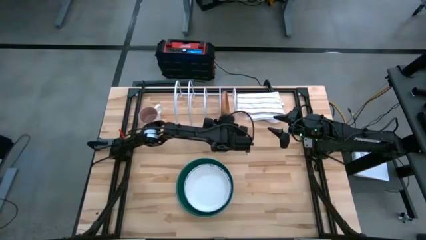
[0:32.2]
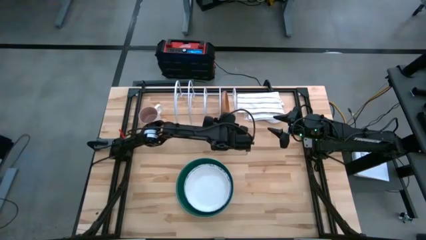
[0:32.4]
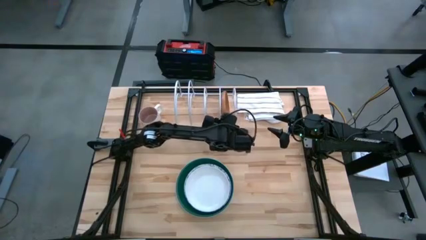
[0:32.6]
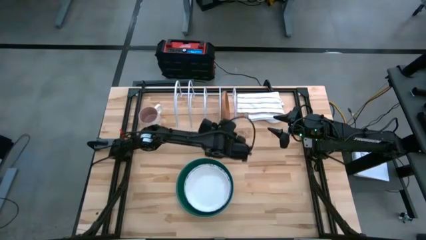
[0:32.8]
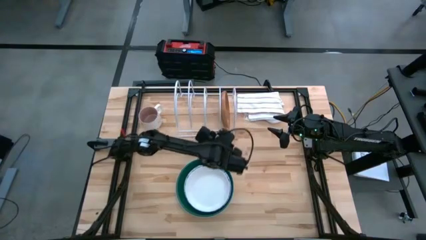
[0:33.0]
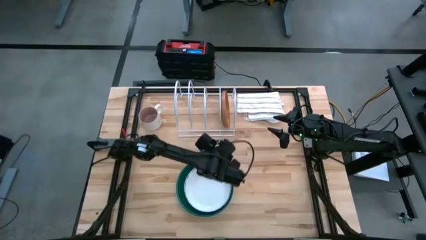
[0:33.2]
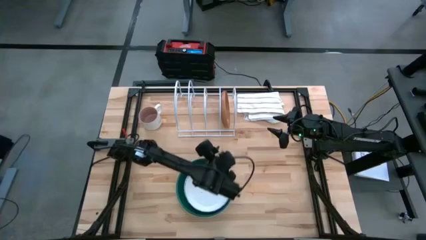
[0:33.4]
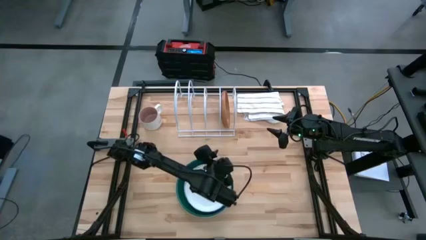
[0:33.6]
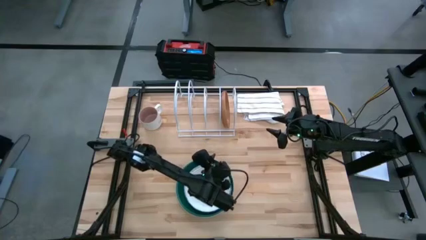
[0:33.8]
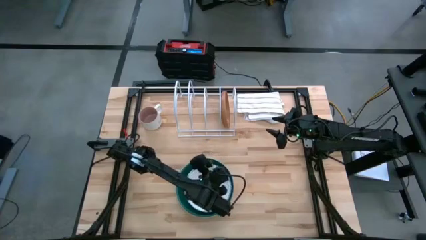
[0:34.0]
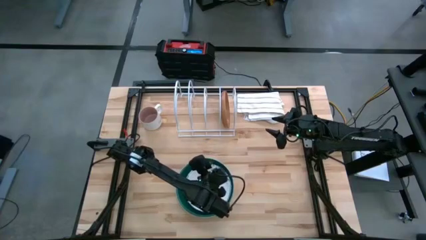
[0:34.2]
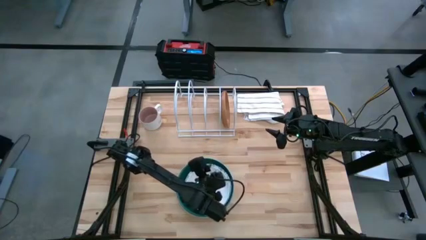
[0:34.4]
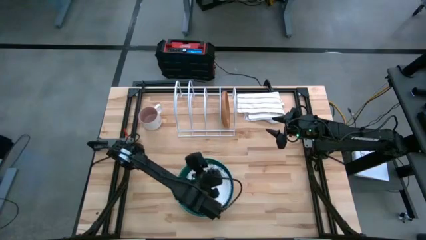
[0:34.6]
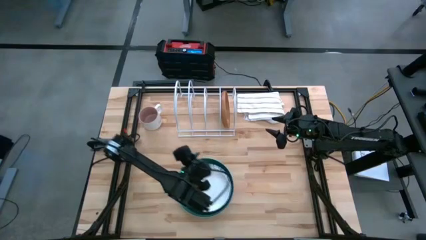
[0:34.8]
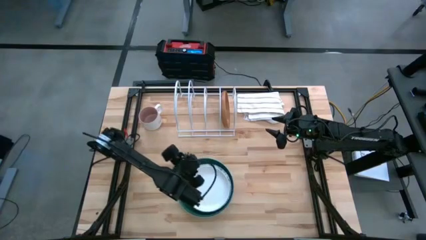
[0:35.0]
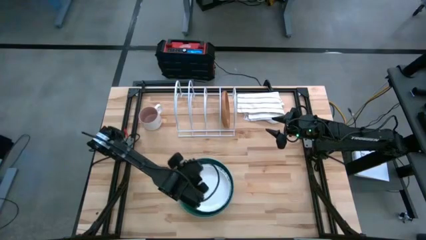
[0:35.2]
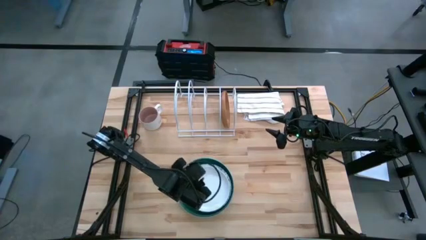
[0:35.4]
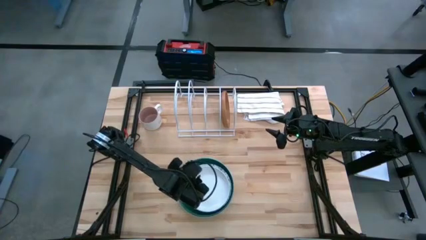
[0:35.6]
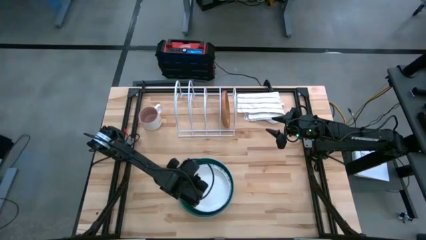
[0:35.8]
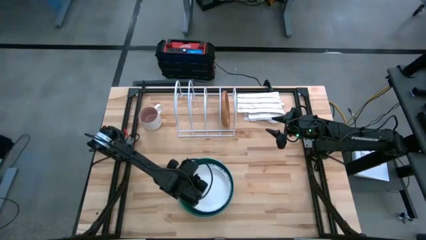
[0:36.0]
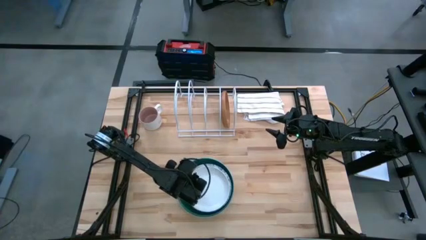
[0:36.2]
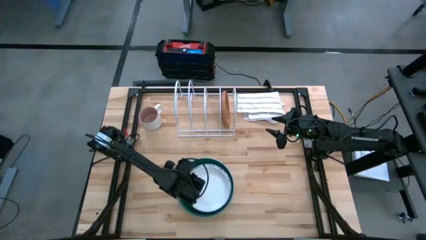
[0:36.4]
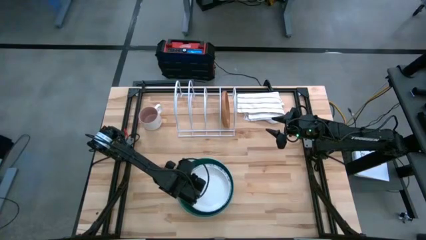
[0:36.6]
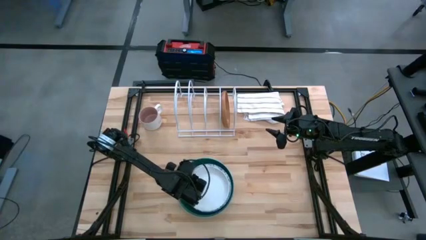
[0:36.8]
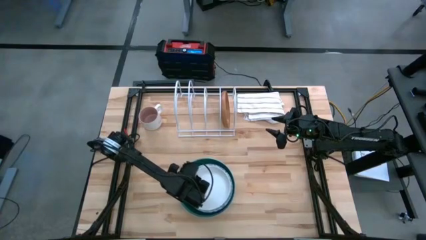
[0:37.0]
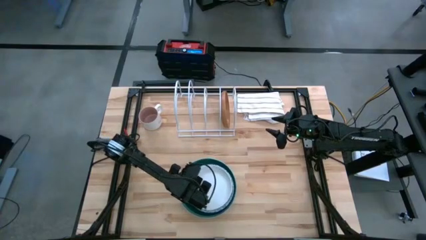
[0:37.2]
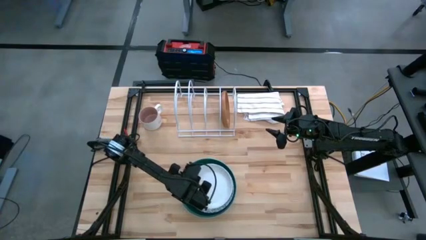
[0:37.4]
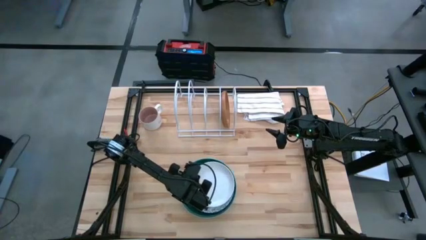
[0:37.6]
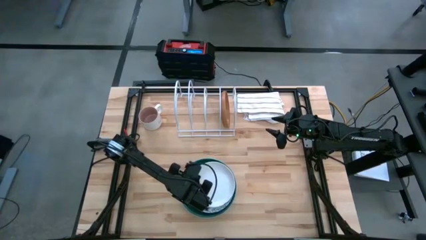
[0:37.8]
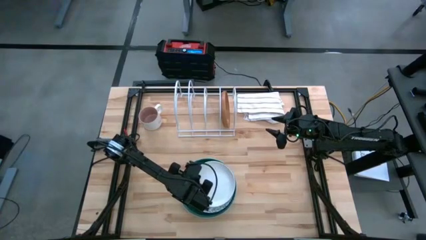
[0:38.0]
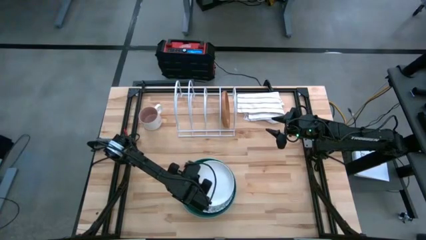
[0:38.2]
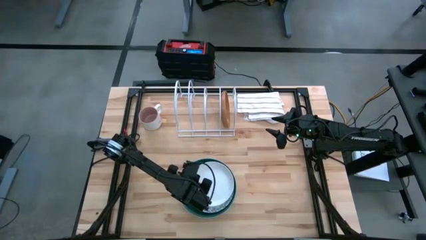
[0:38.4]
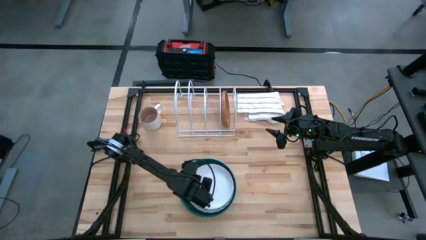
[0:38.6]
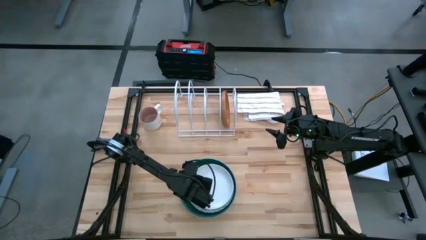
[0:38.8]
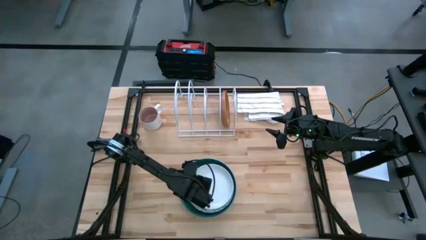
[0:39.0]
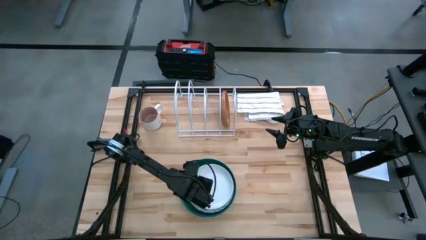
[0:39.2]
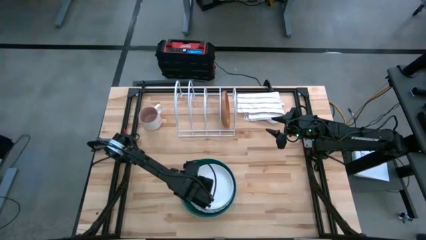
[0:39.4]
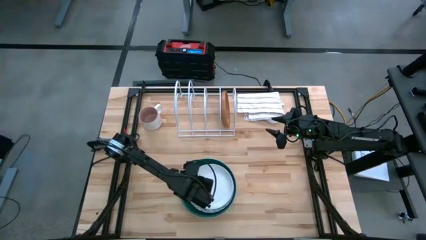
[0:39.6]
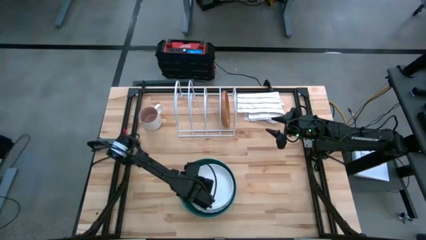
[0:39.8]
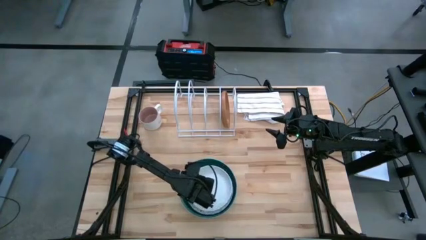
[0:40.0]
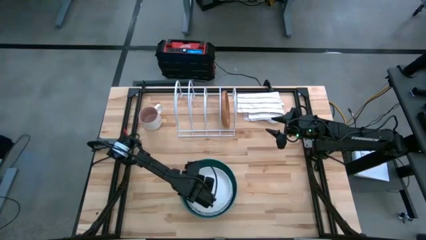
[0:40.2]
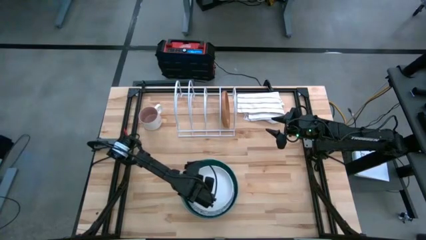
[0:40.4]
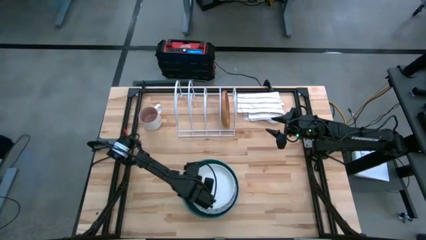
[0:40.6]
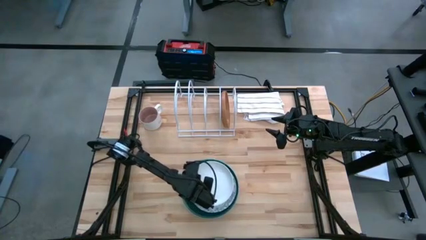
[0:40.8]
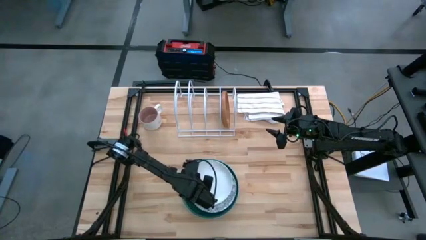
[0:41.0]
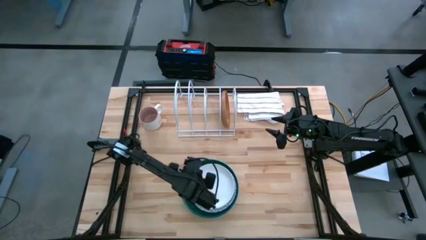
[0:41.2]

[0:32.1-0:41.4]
Task: Sort dishes
Put the white plate into the dishwasher rack
